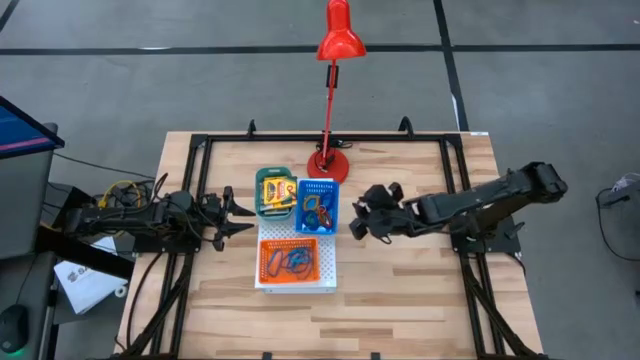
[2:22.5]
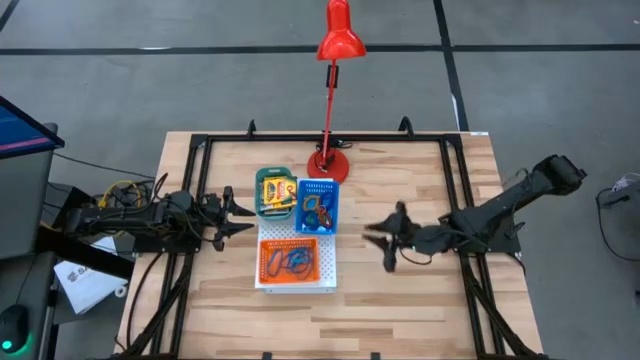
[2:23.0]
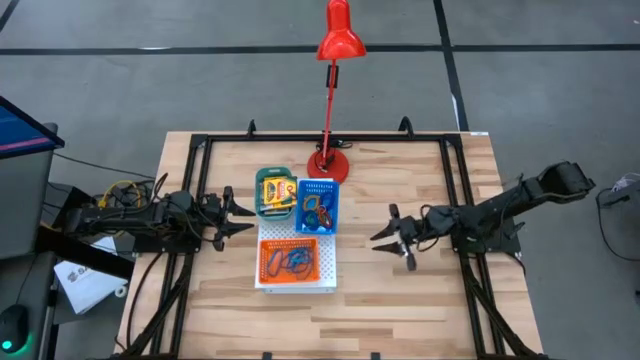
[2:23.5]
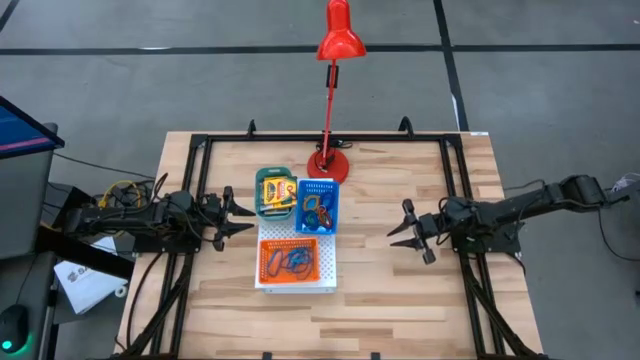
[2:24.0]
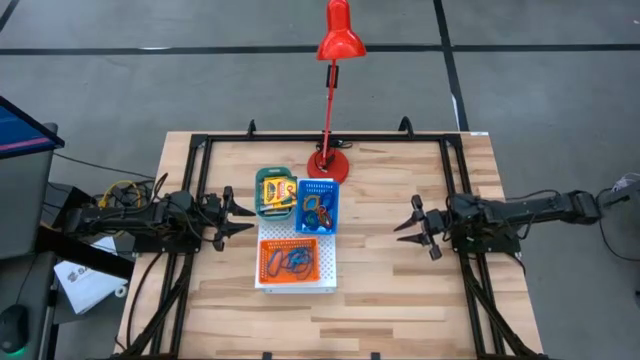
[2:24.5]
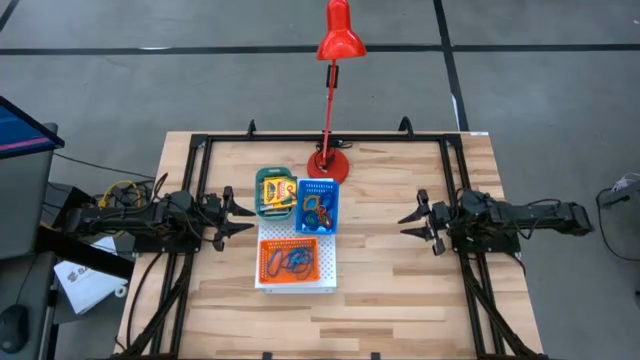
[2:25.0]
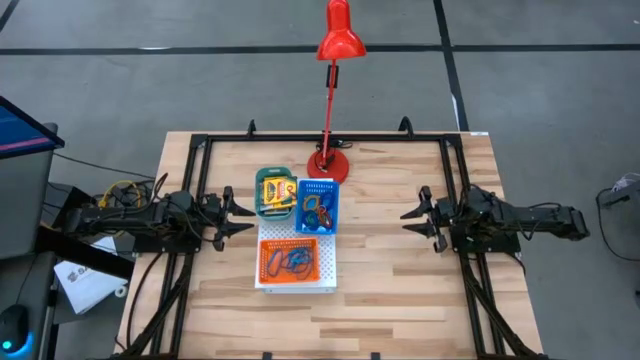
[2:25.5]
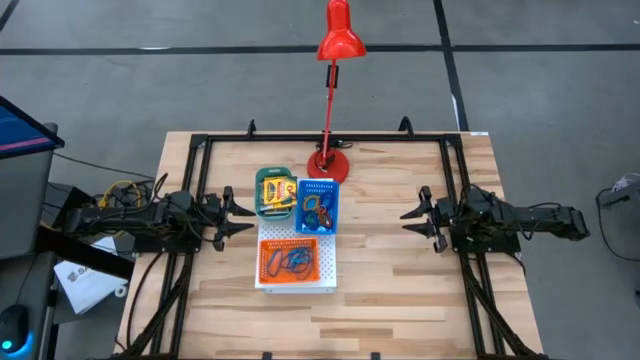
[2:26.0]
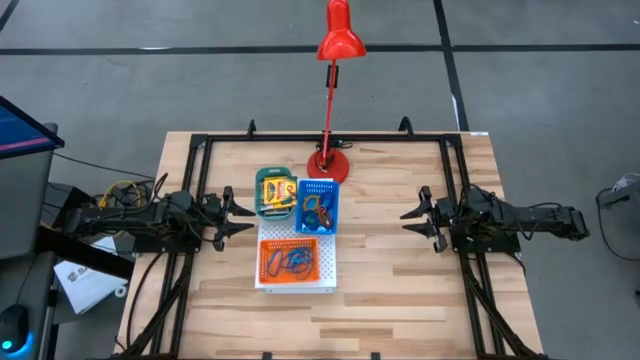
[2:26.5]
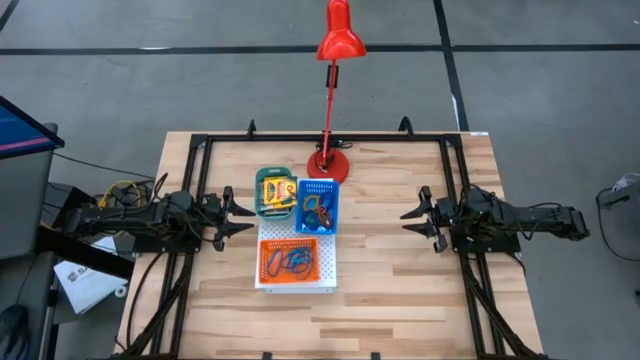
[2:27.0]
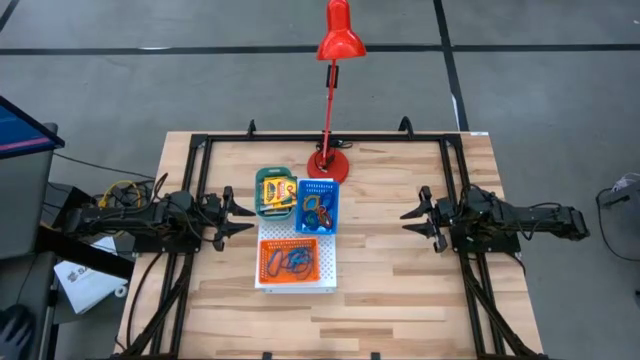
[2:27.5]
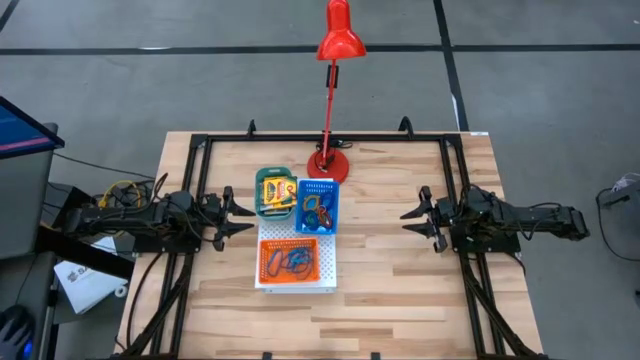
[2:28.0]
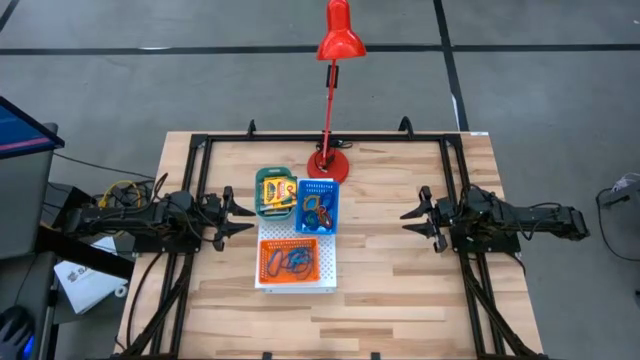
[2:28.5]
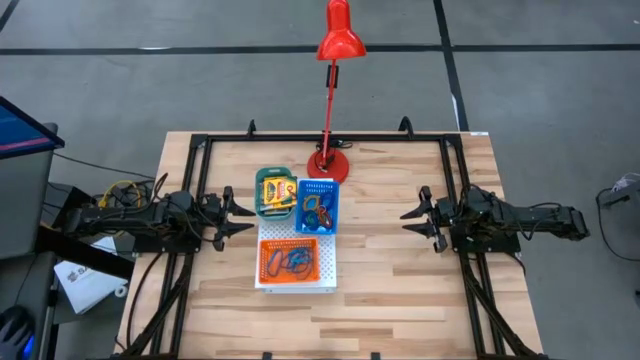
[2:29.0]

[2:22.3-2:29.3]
Task: Pick & Place Office Desk Supplies
Return to Home Position

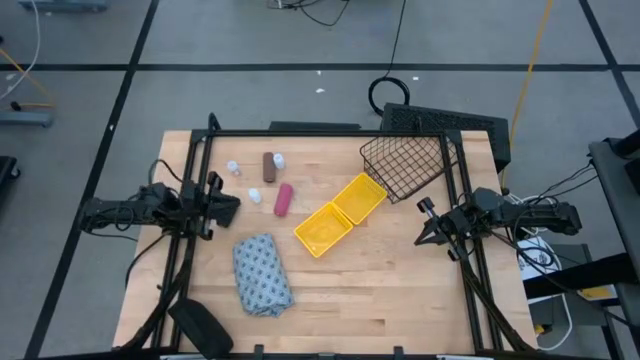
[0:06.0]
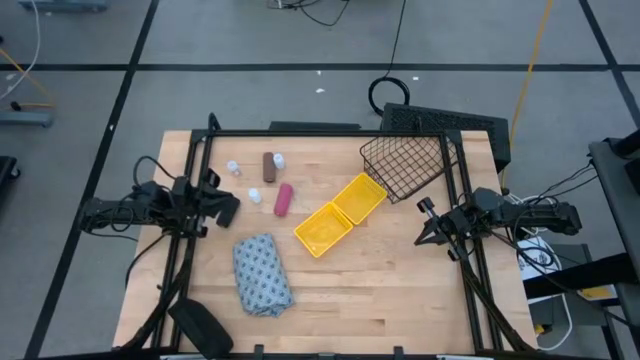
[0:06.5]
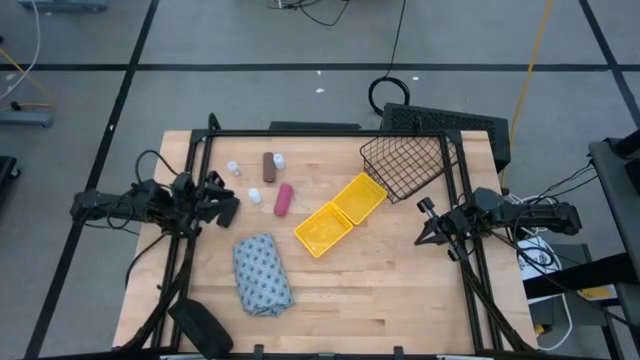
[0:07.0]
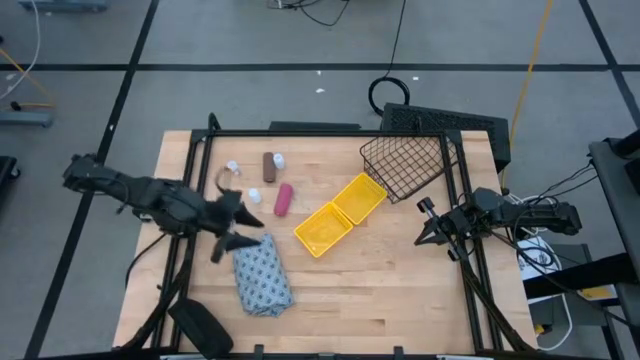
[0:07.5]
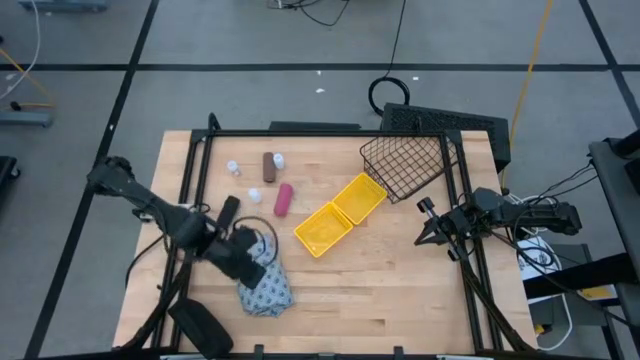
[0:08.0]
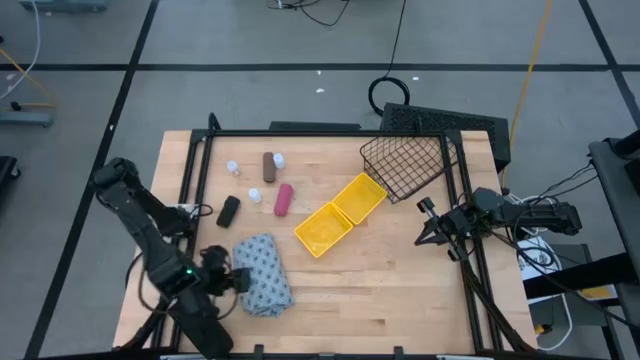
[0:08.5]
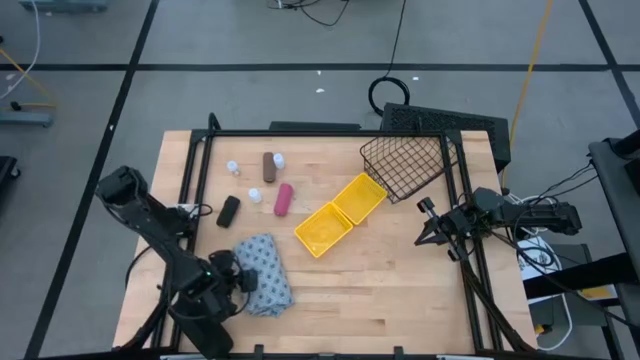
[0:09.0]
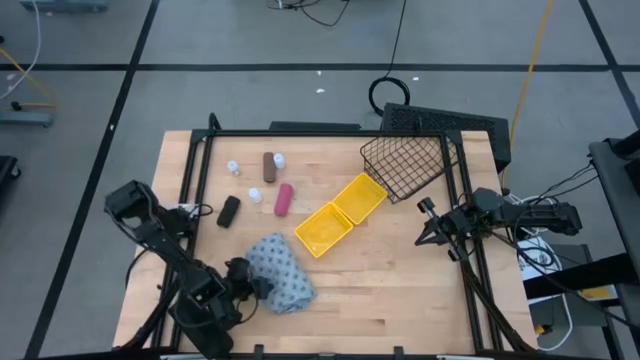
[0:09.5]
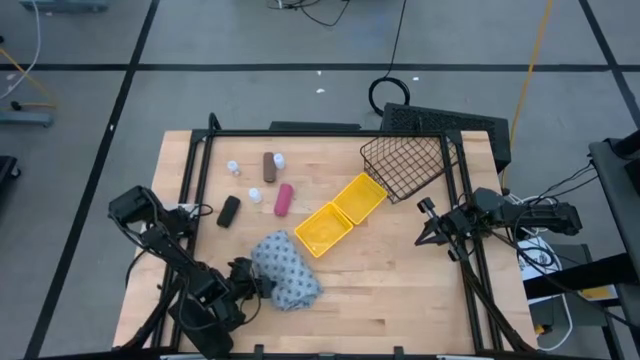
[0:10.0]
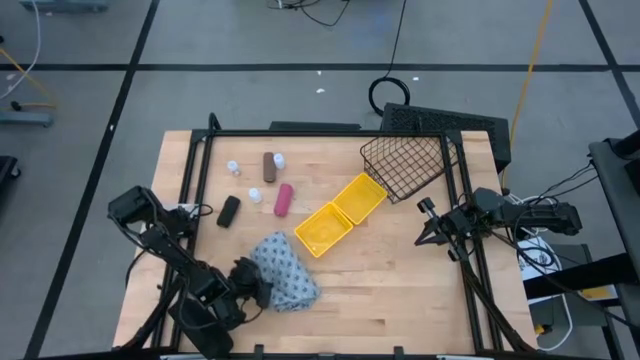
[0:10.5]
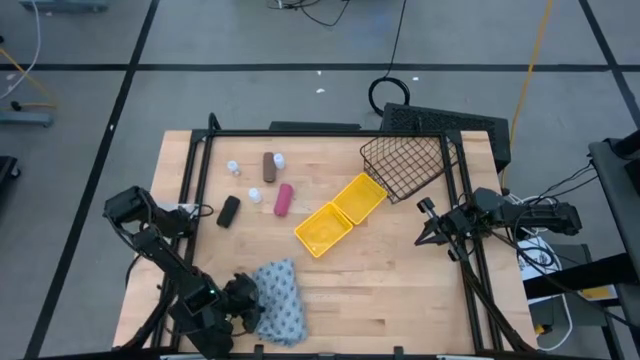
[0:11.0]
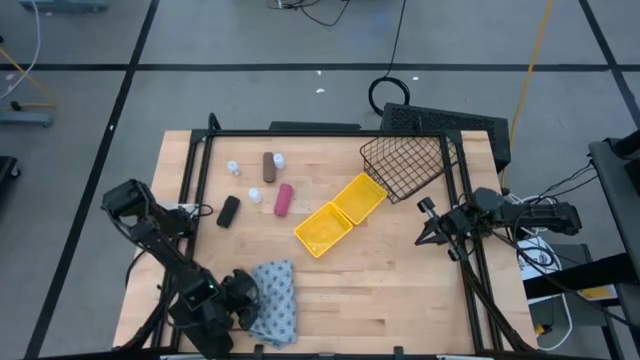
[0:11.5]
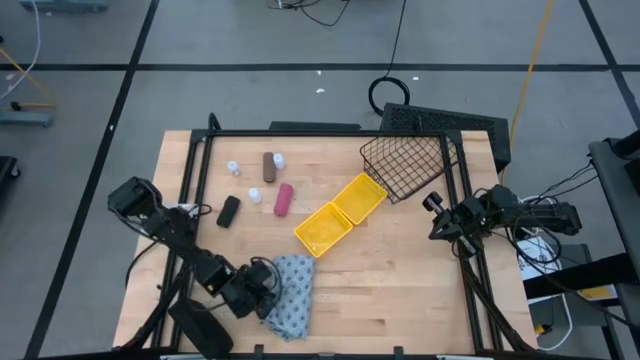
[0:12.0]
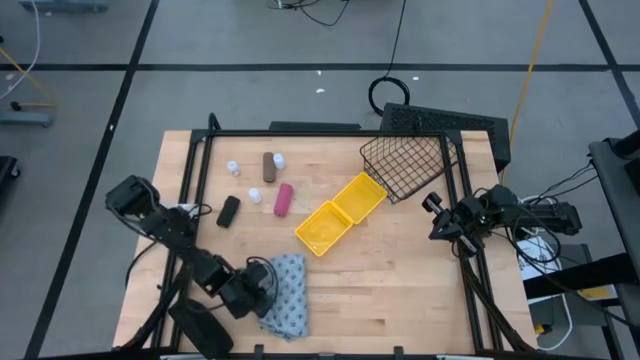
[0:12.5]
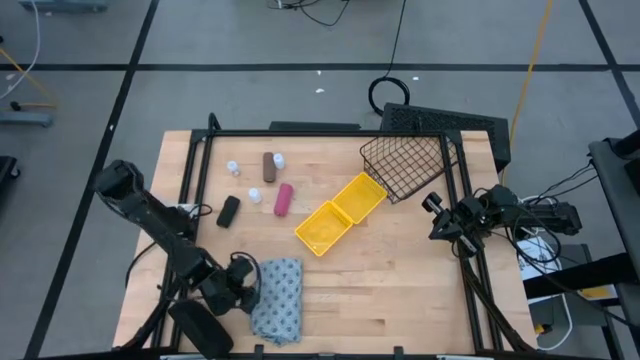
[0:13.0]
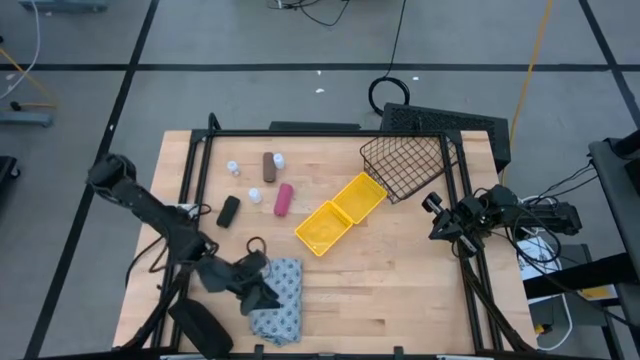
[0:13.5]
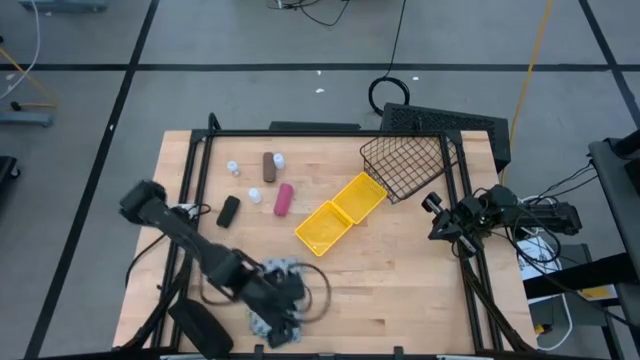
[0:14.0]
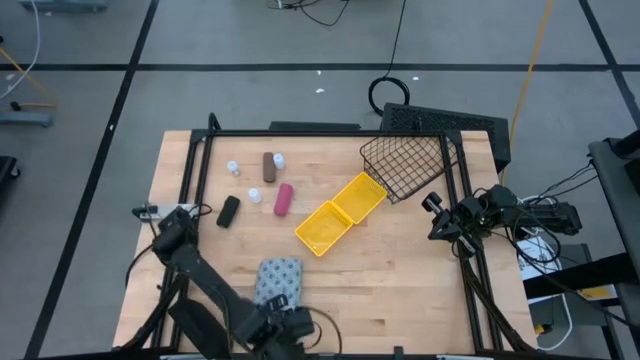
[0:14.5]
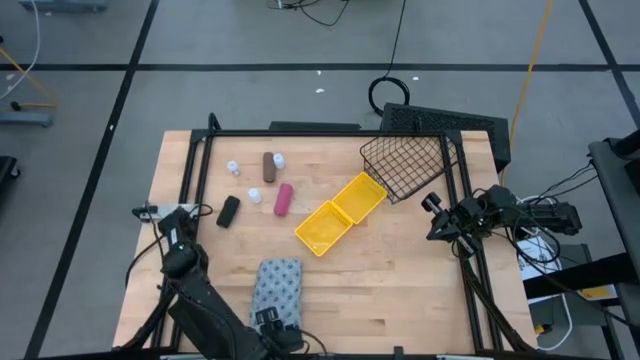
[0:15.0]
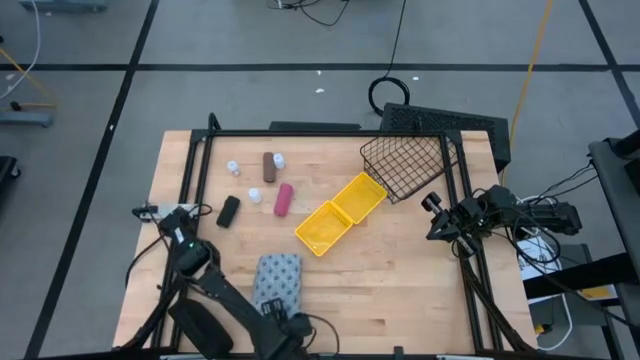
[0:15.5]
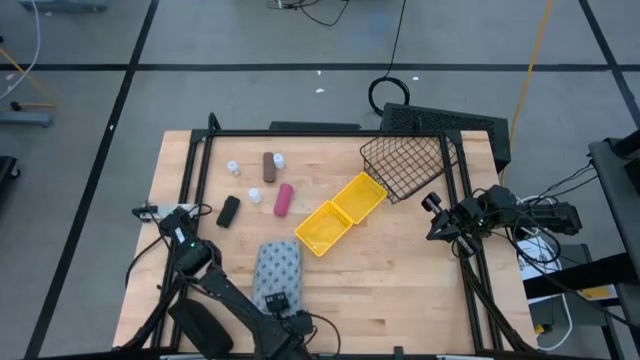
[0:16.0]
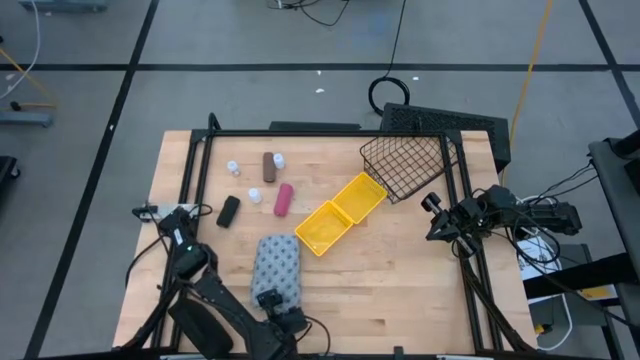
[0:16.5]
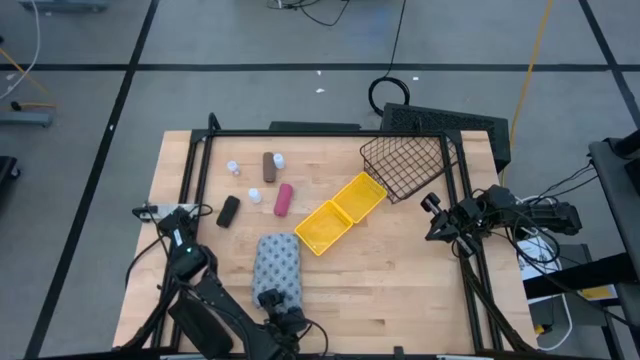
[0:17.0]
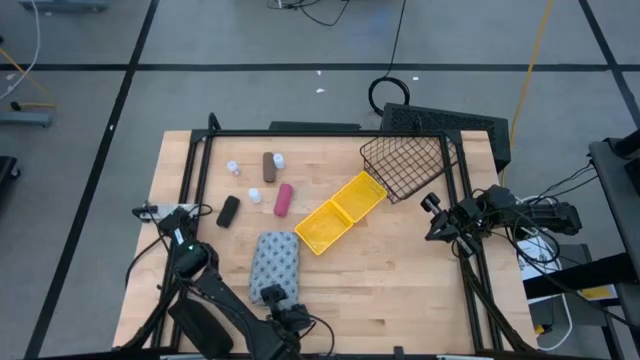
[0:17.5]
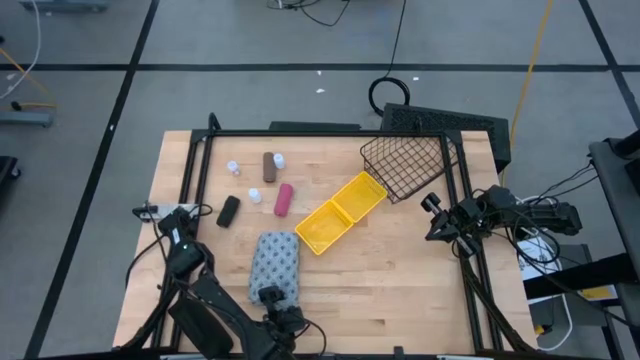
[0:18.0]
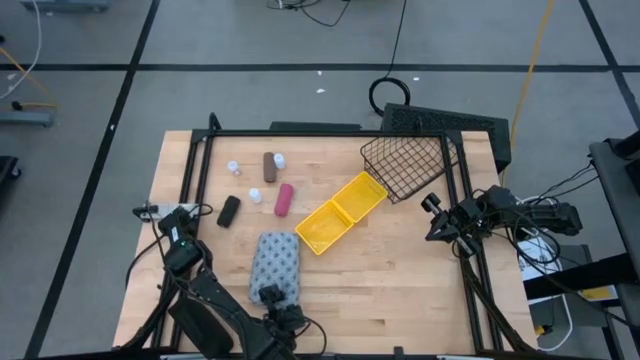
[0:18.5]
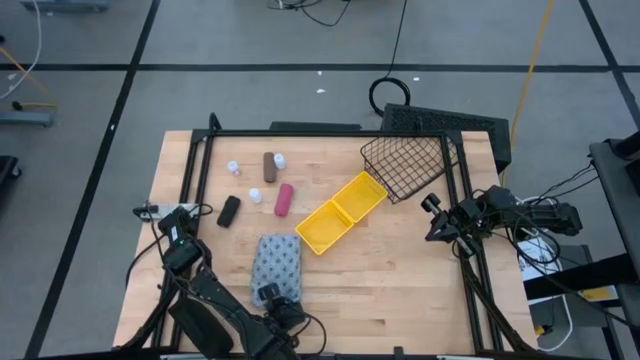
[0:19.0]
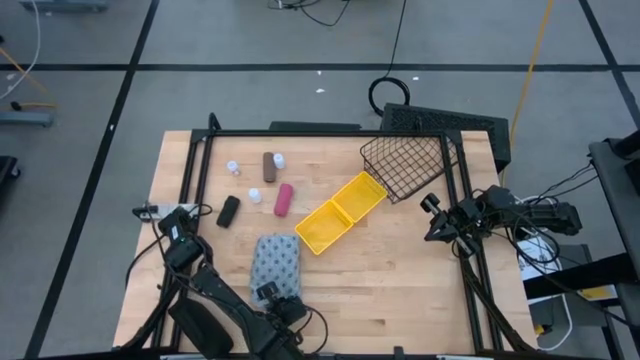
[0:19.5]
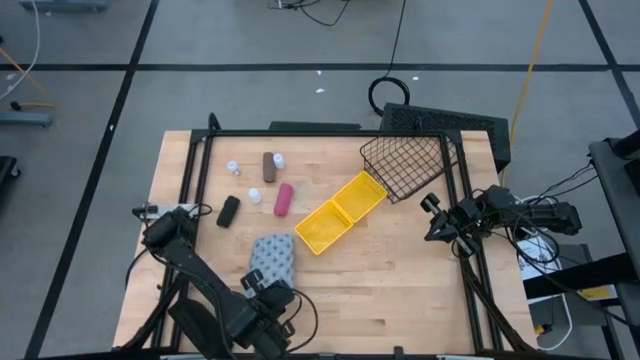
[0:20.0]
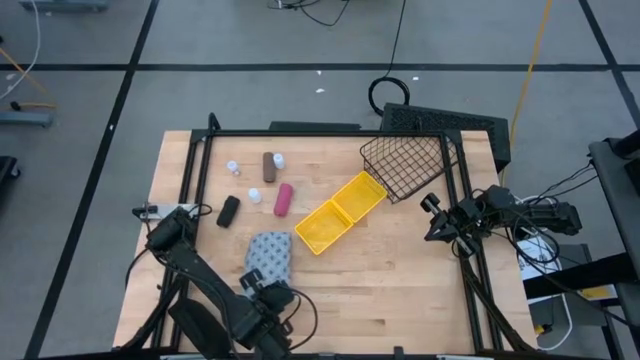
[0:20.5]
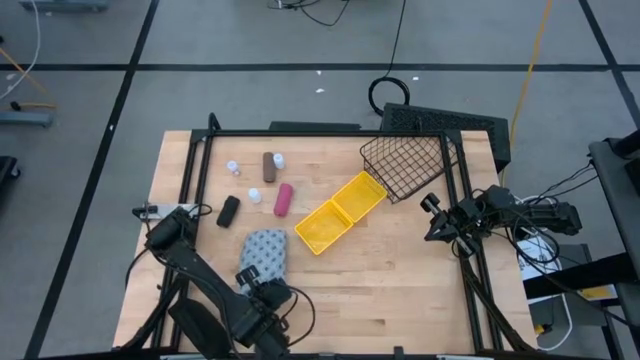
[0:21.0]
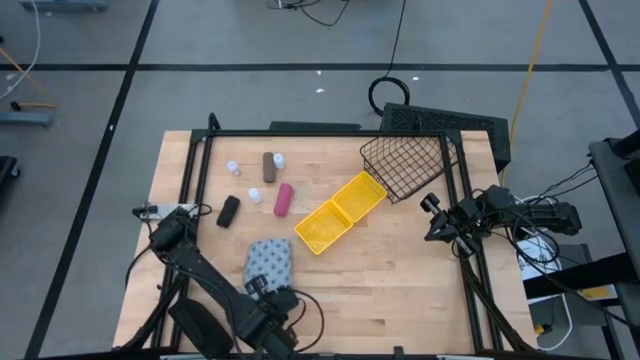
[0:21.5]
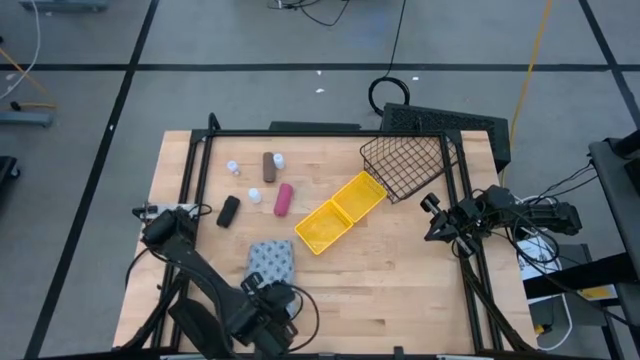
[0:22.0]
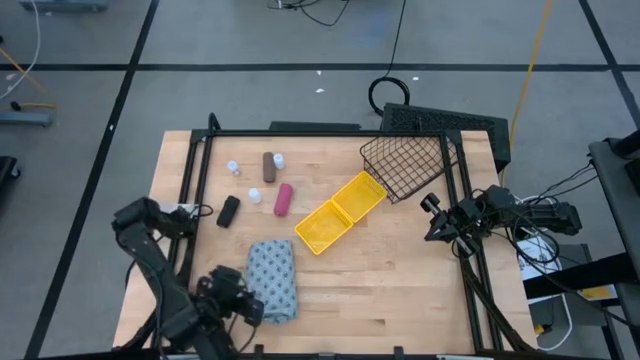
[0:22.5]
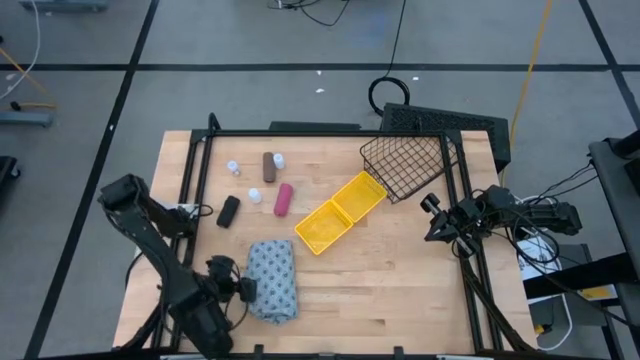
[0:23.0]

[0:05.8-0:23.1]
Task: Pick & place medical supplies in basket/bin
Put the hospital gown into the black wire basket
